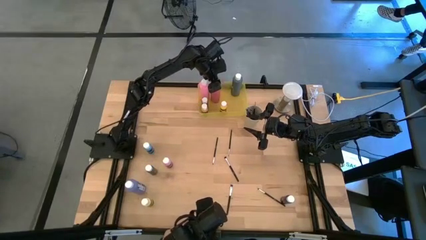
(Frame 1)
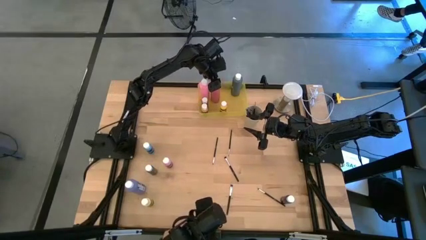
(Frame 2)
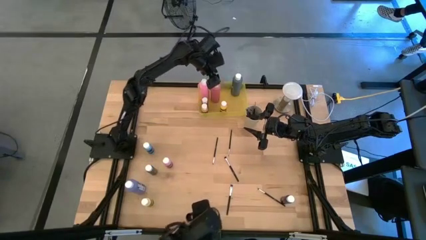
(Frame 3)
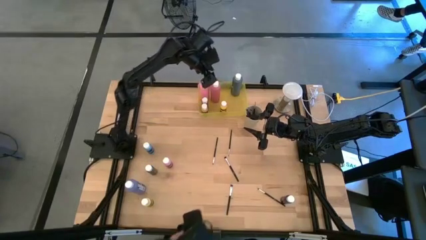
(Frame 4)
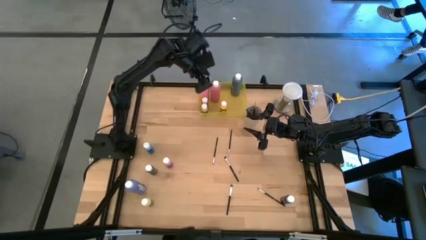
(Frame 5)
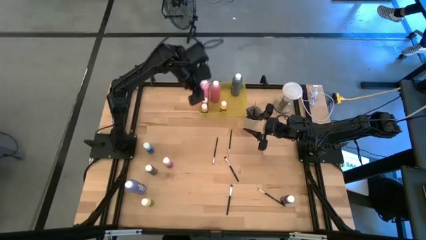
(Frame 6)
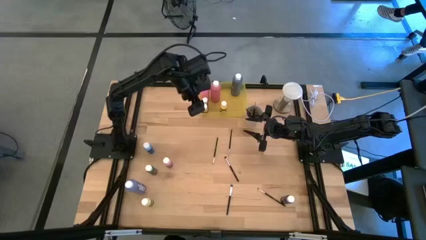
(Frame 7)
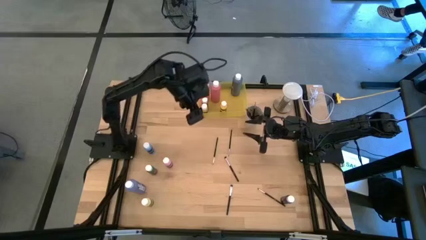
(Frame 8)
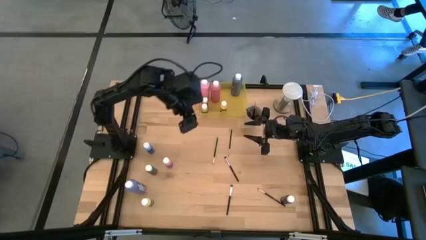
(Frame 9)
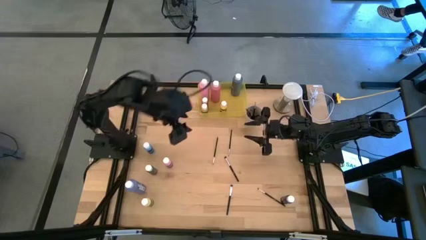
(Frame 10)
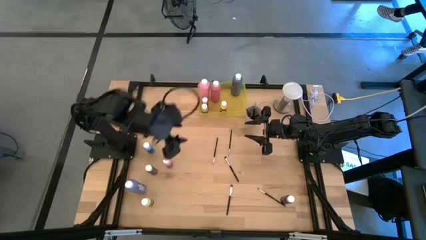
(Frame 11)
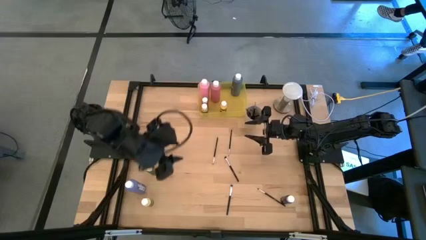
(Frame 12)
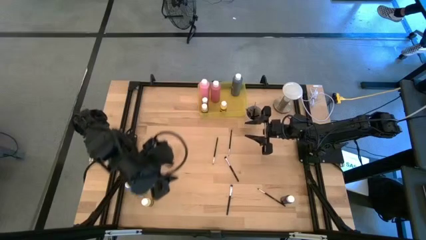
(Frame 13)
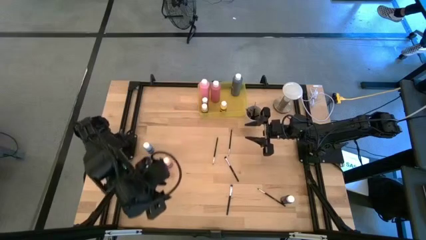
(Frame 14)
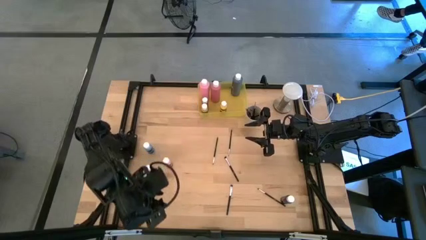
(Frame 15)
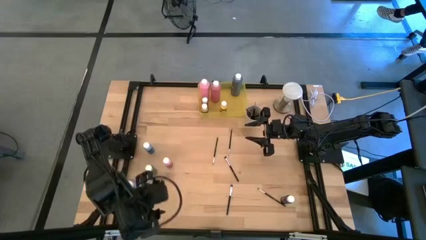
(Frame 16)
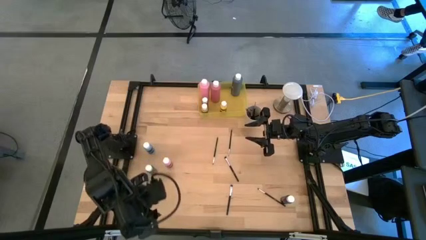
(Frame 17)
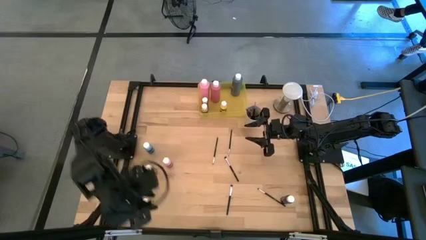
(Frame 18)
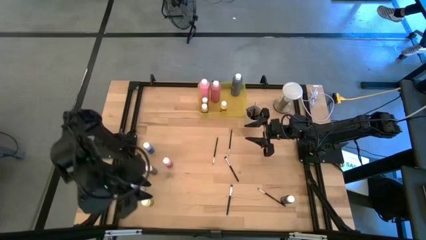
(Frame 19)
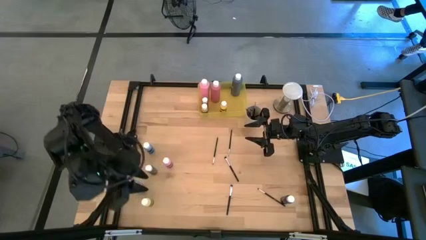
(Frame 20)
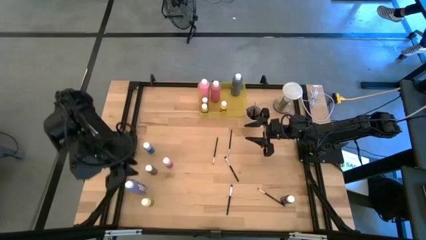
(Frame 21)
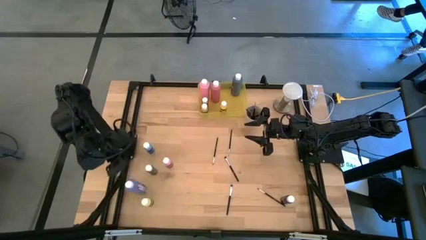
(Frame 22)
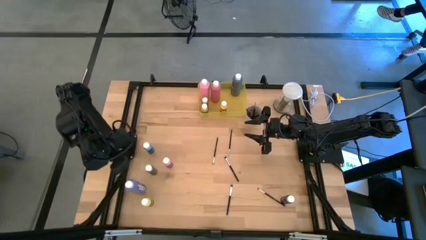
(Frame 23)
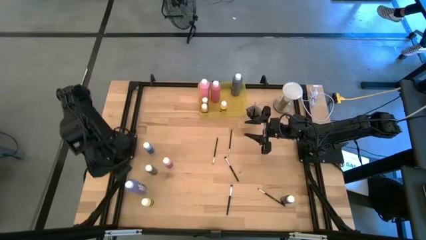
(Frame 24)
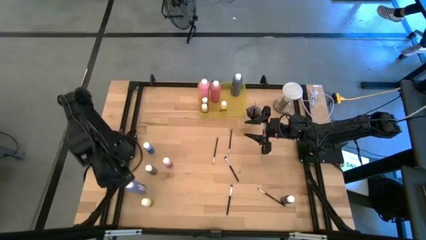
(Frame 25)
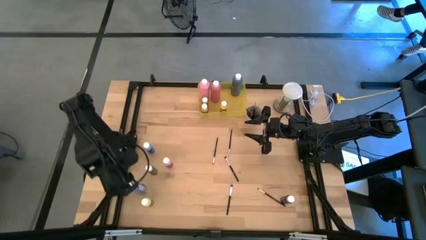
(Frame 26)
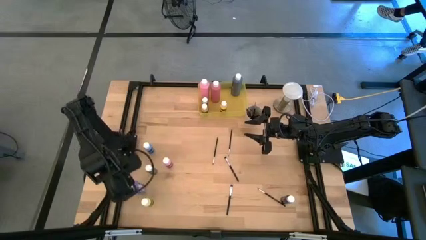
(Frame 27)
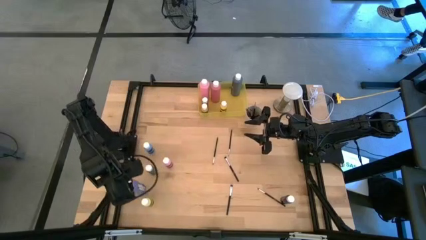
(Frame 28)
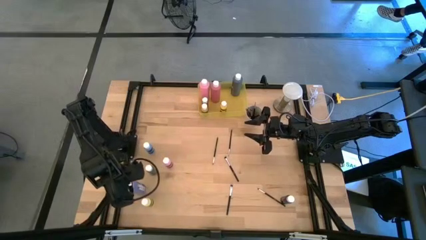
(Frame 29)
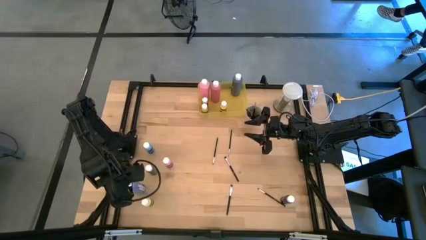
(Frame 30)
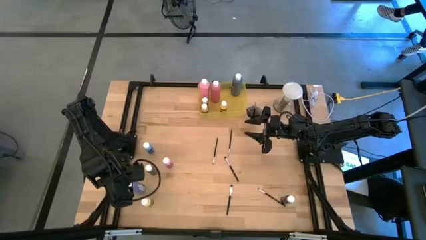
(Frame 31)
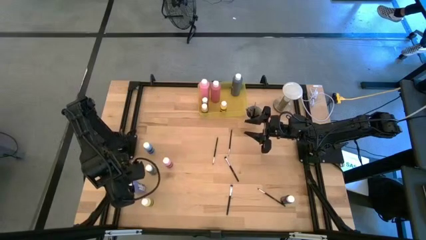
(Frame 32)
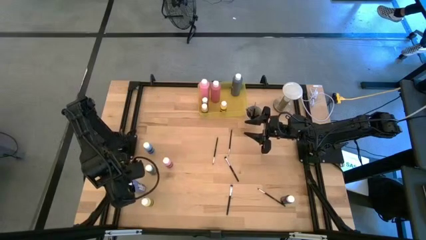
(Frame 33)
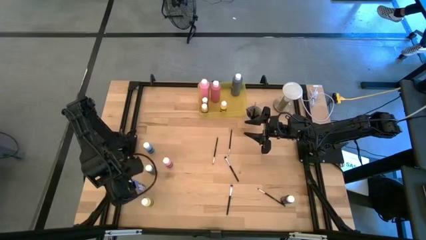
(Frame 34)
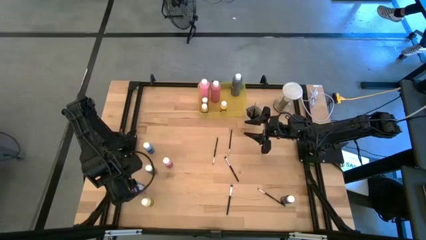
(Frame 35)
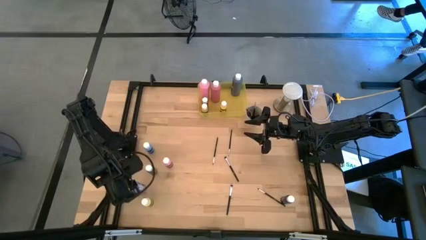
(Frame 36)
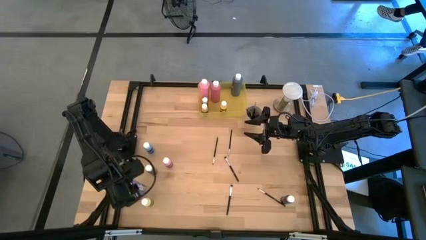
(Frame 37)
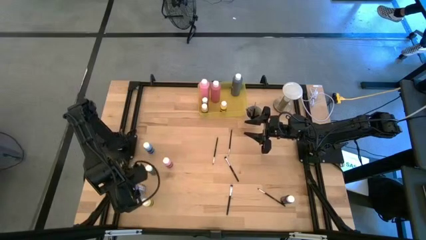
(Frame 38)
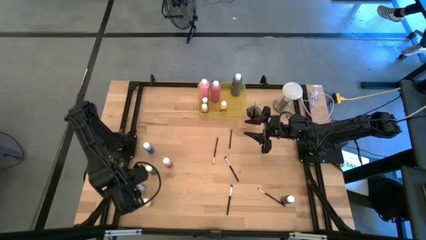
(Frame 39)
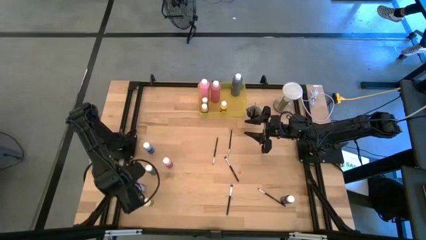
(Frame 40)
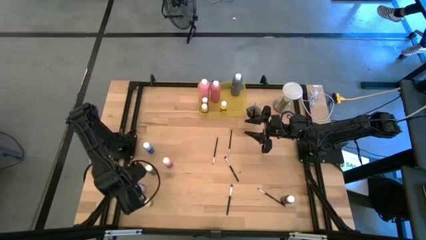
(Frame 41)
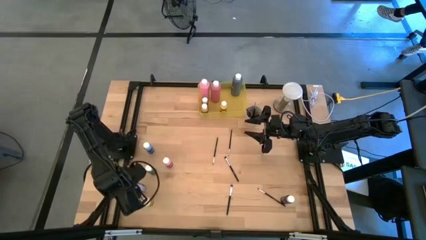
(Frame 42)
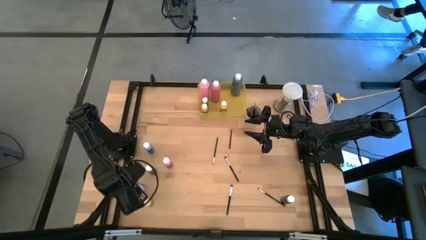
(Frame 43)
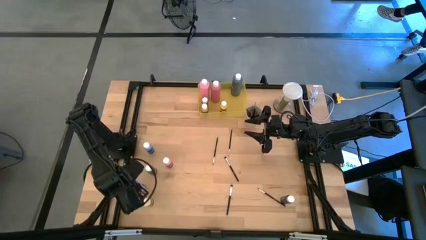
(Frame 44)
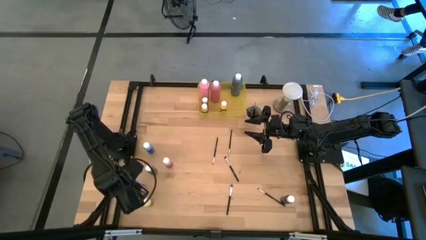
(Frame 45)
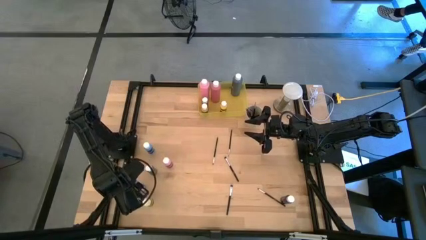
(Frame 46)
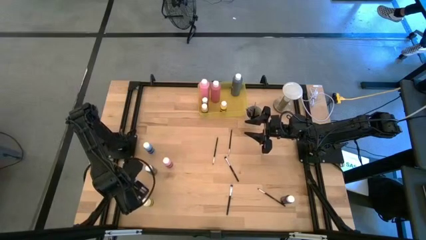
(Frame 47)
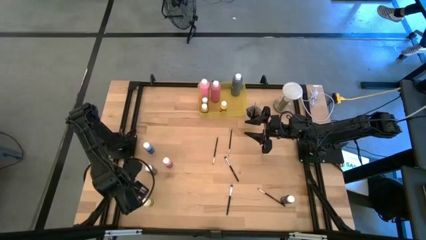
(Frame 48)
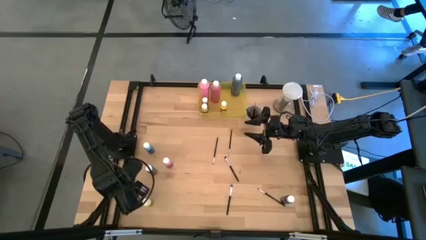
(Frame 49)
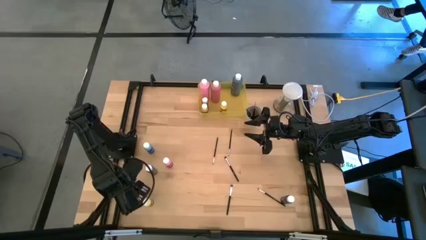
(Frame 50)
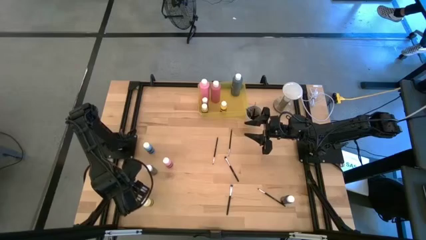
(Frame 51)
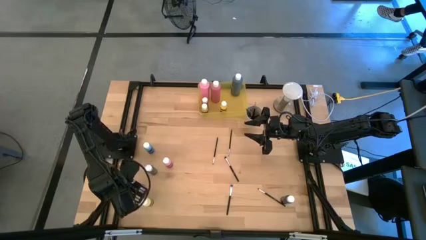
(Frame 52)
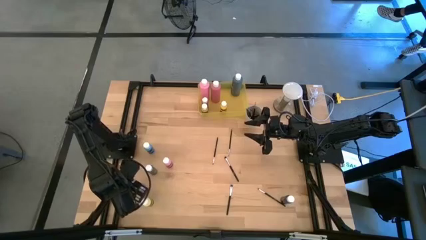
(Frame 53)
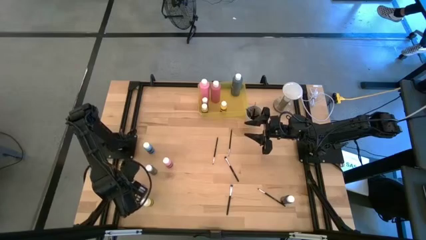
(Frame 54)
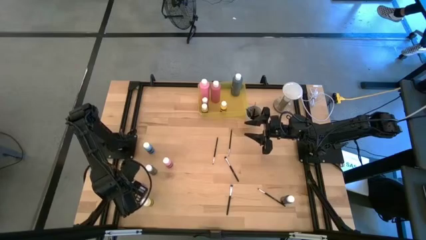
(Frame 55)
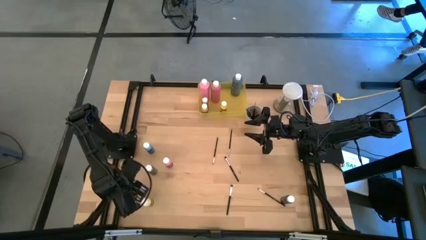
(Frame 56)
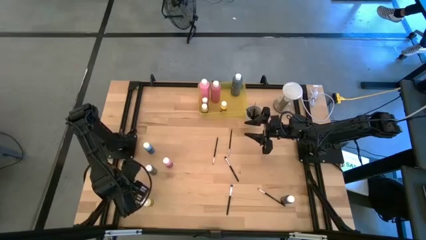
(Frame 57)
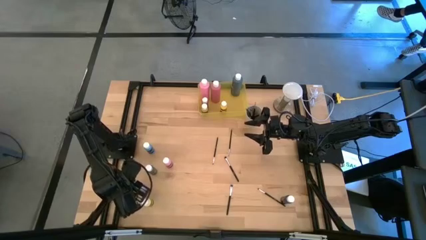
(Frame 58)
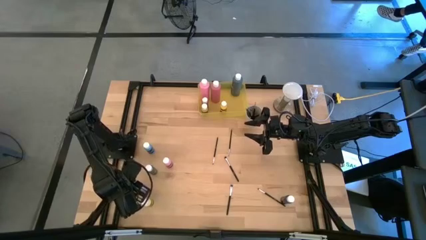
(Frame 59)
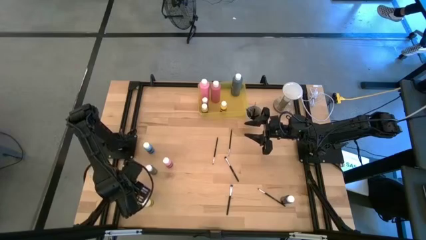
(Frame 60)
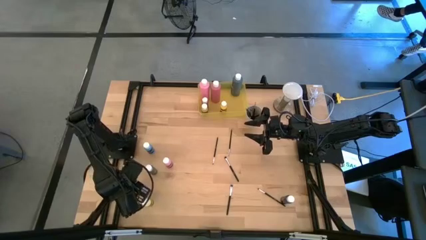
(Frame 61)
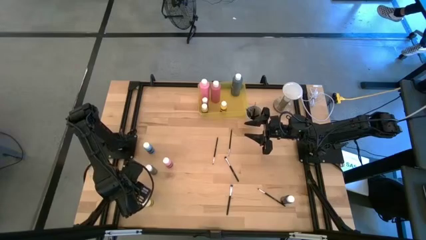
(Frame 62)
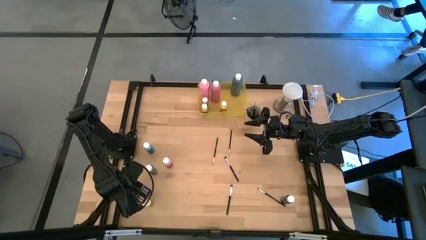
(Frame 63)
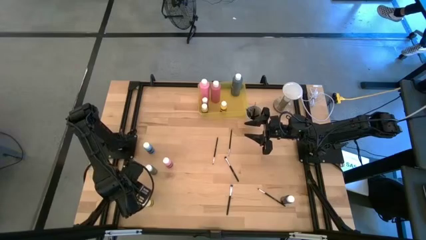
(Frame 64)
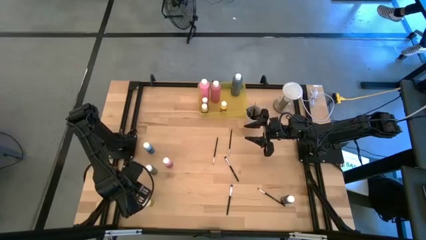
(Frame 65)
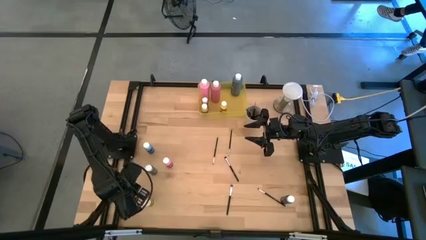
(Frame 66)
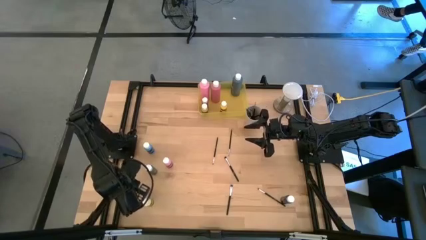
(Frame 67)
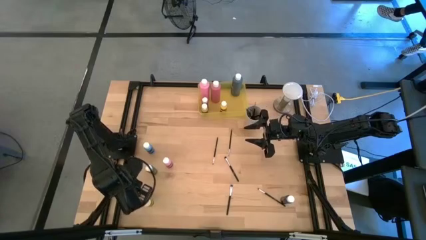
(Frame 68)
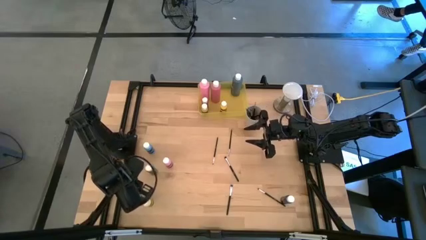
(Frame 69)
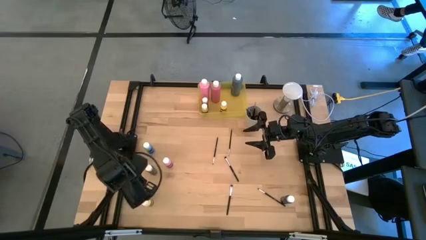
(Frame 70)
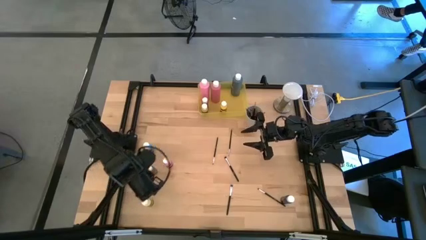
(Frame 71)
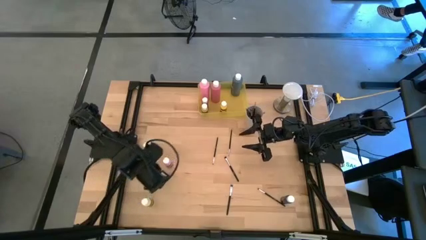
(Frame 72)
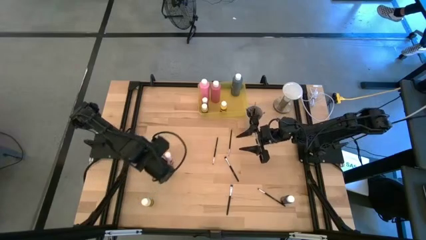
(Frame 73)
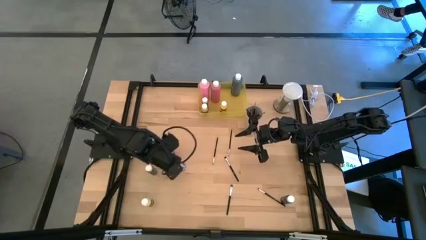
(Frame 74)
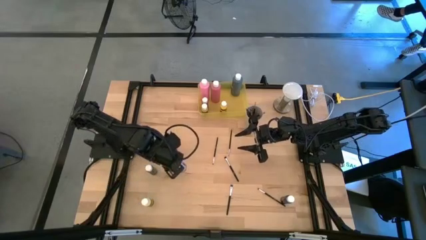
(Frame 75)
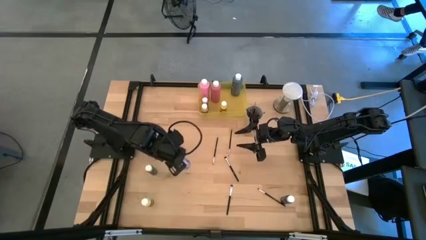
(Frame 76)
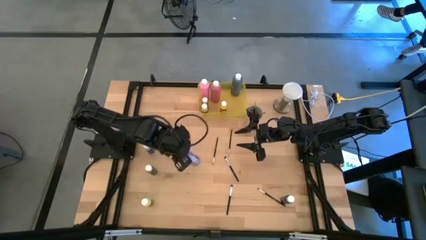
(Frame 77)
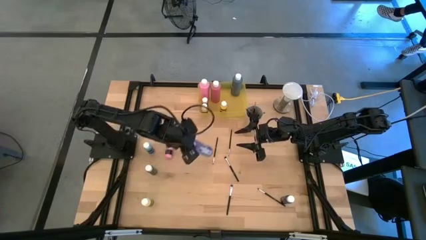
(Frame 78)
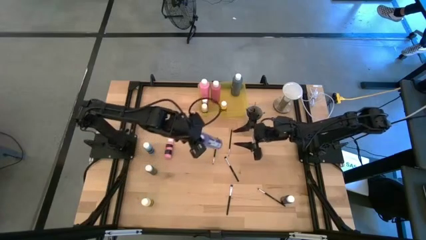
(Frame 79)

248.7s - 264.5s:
Task: Pick & Place Paint Supplies
Put the large blue paint bottle into the yellow bin
